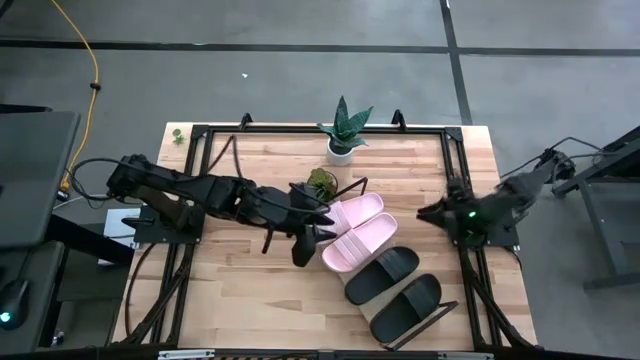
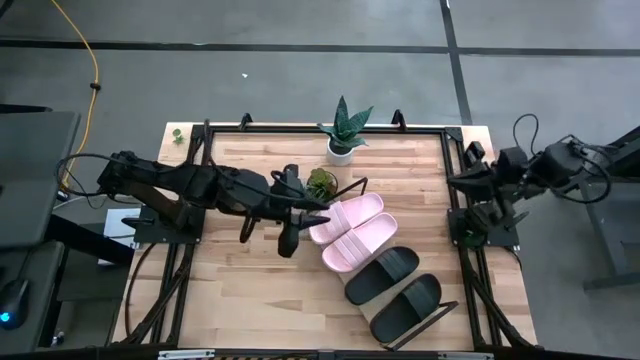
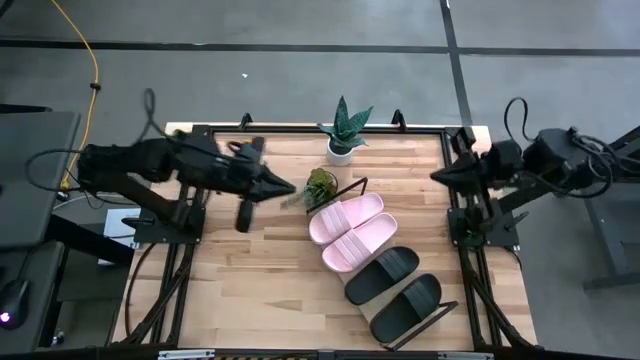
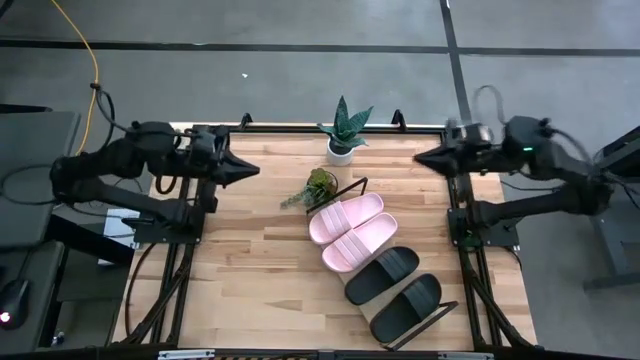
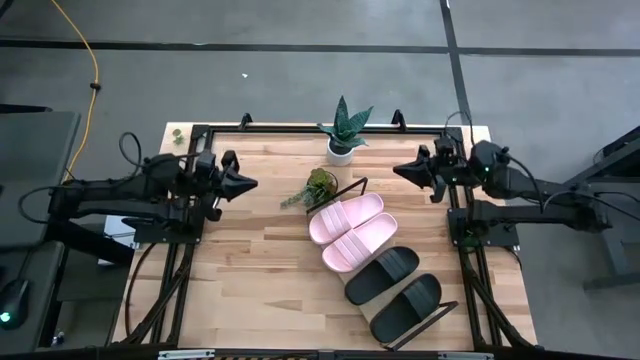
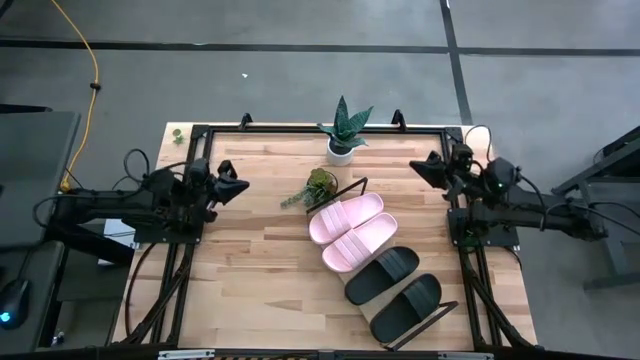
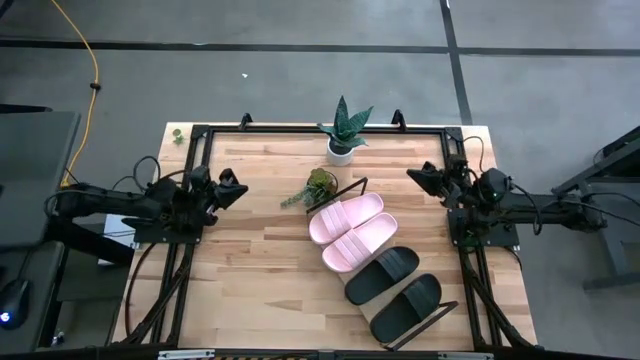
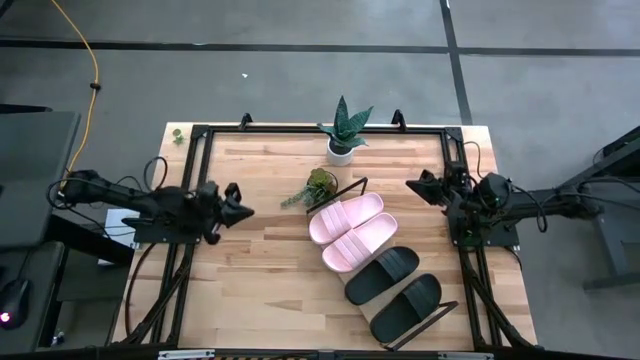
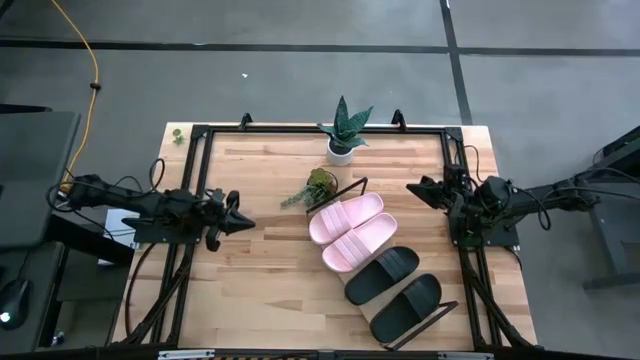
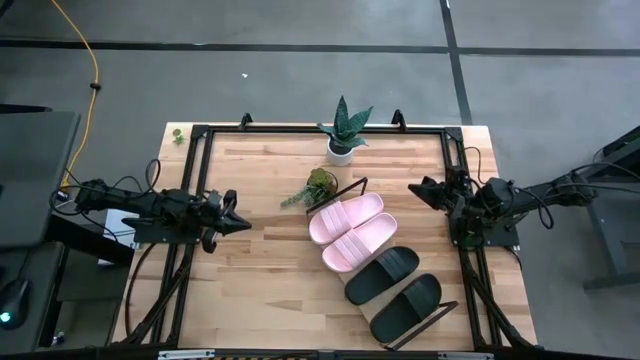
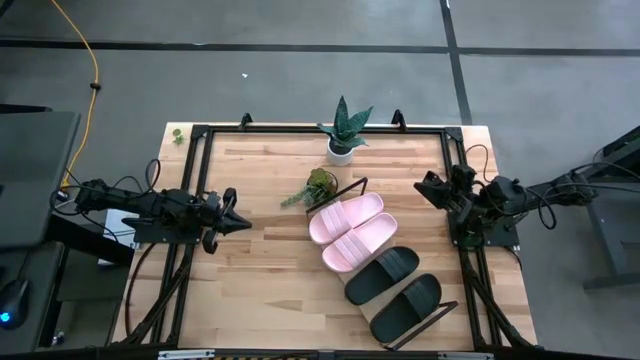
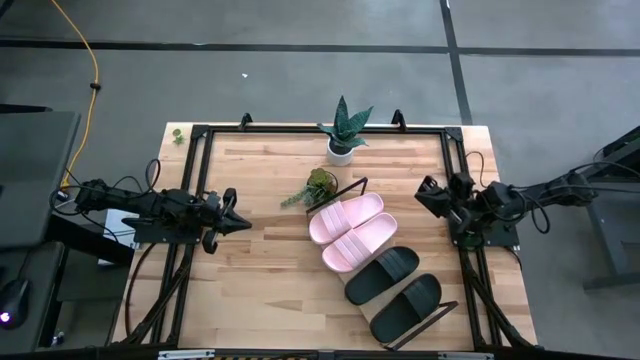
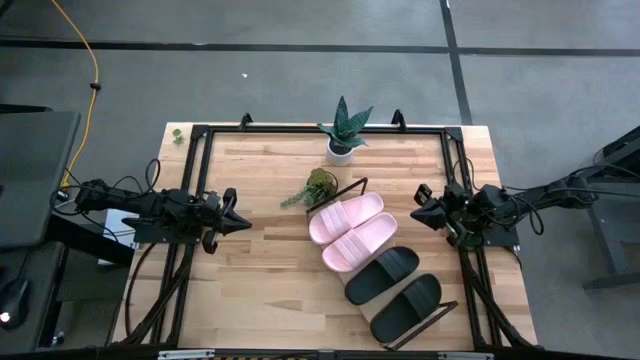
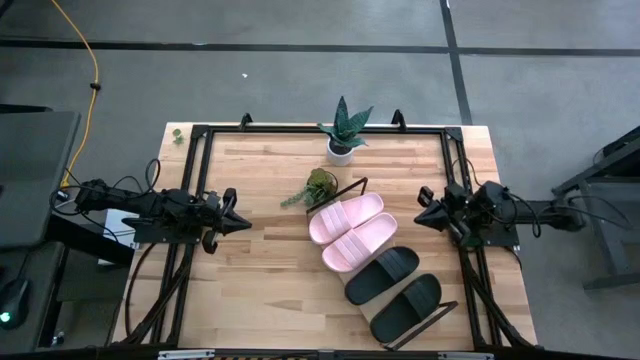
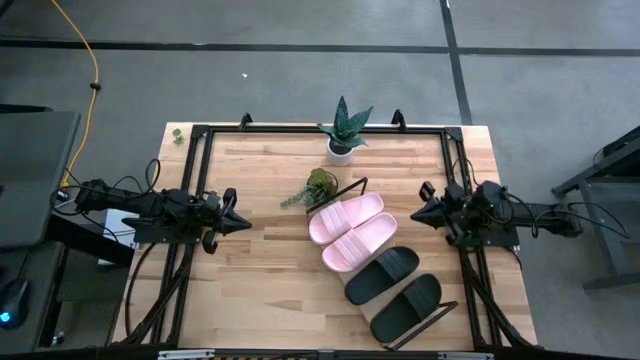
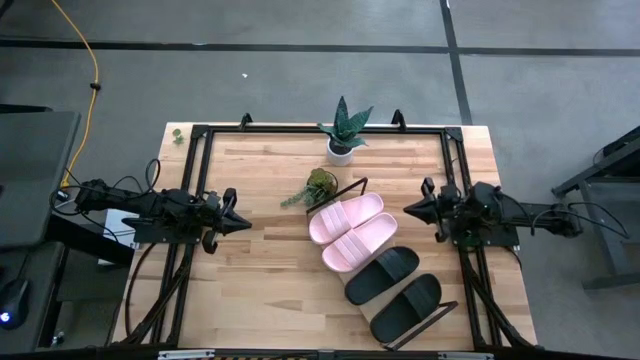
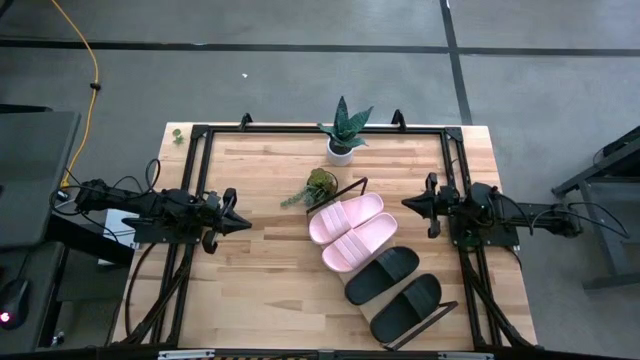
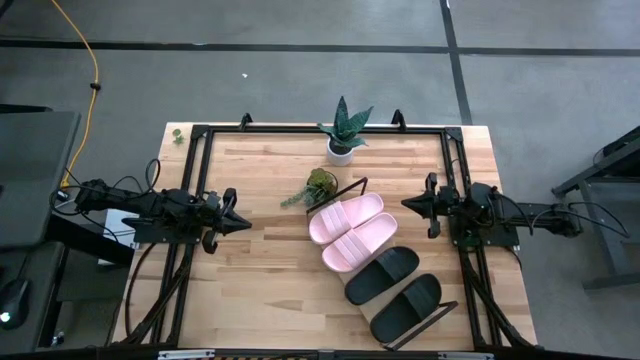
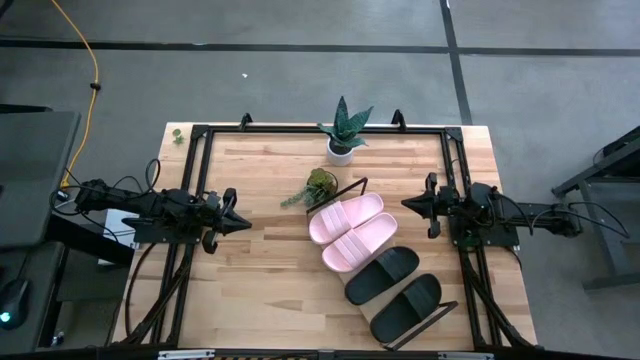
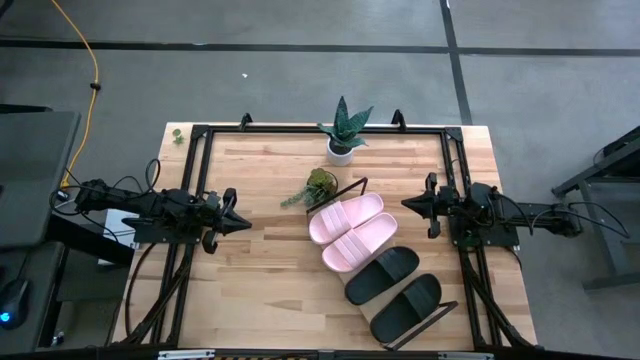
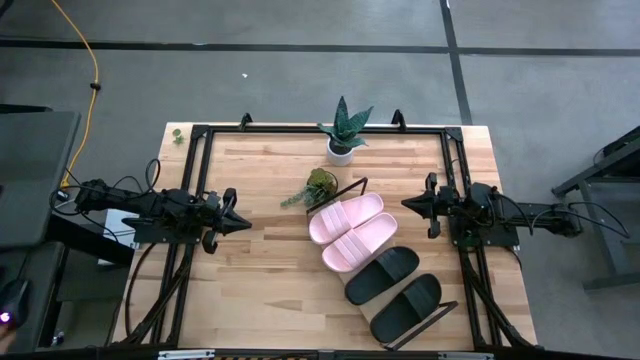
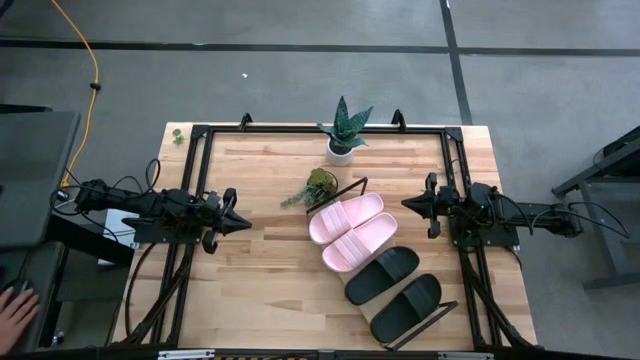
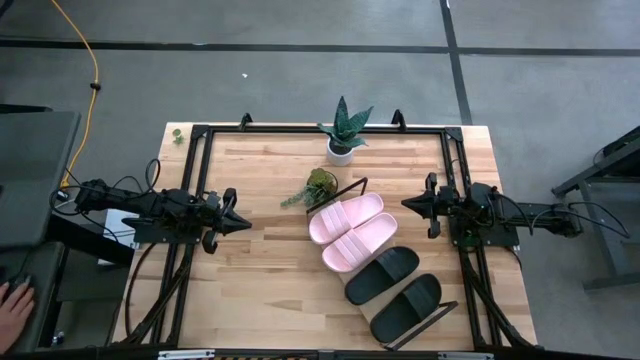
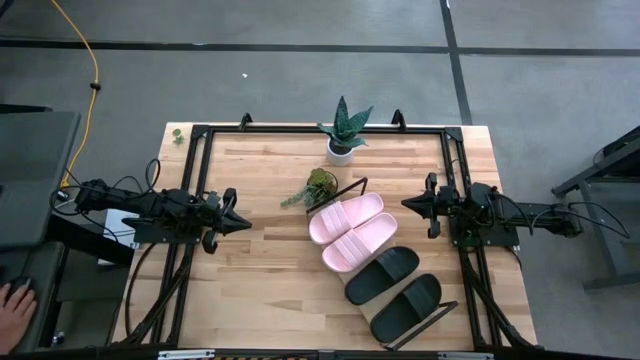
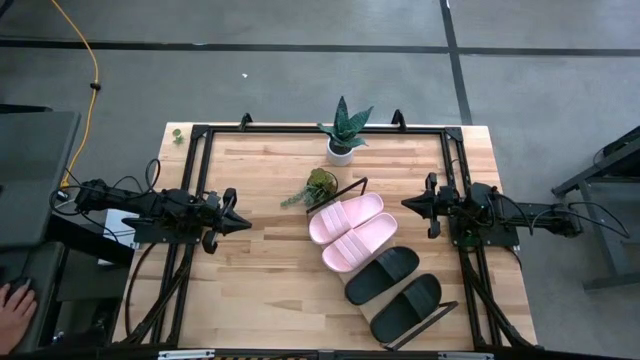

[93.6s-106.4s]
Task: Pick and place slides into the shelf
Return to Home Position

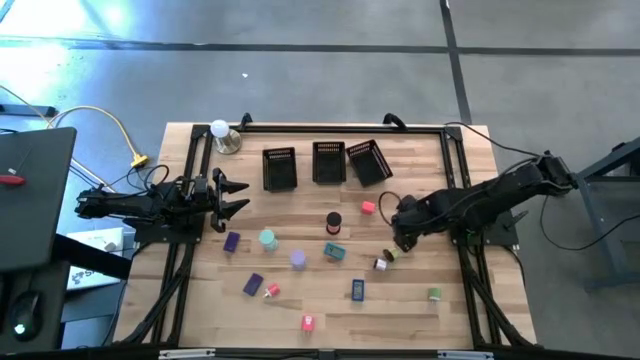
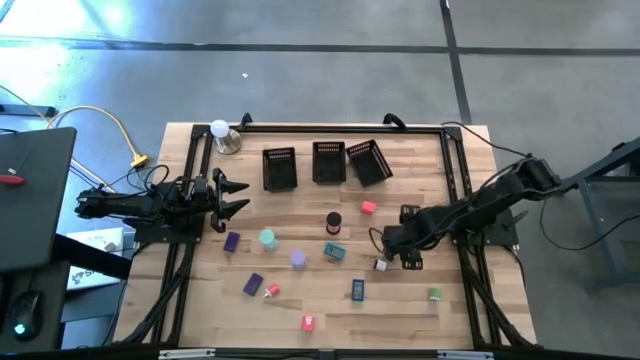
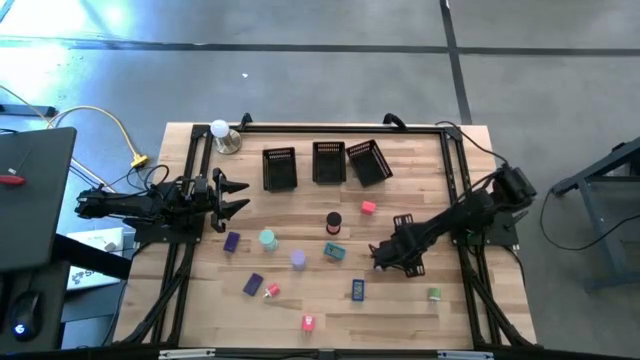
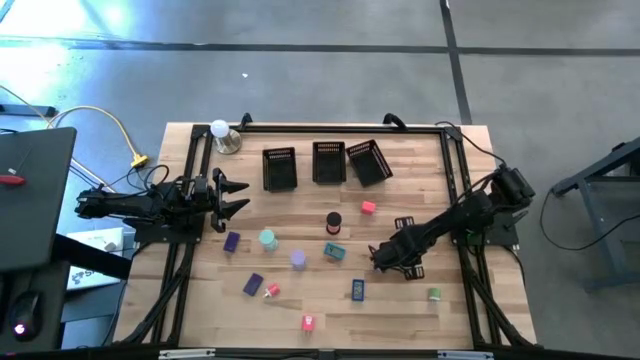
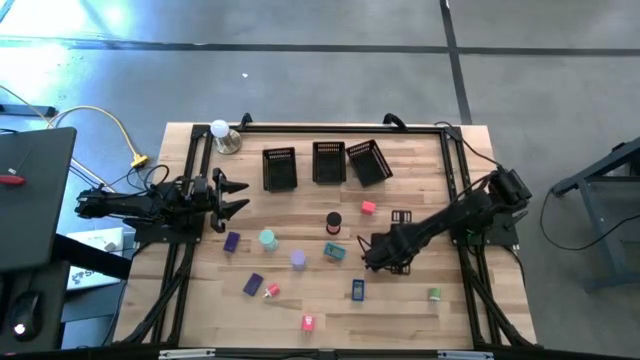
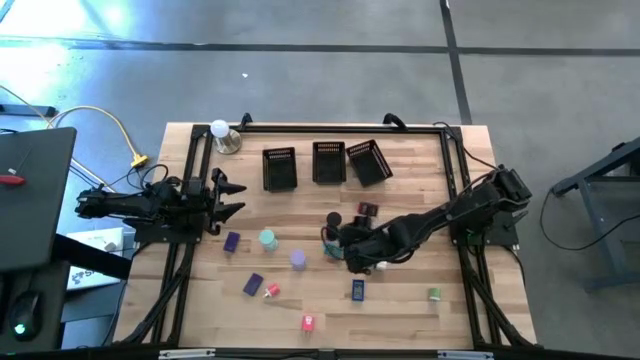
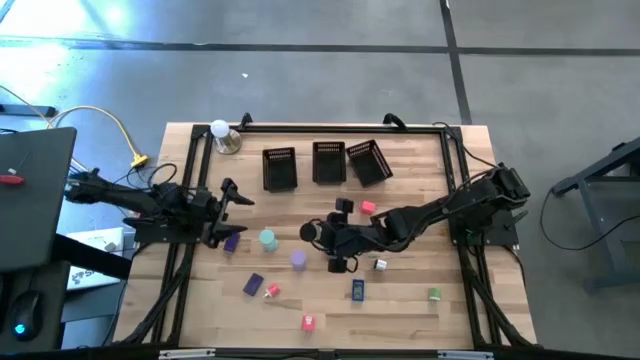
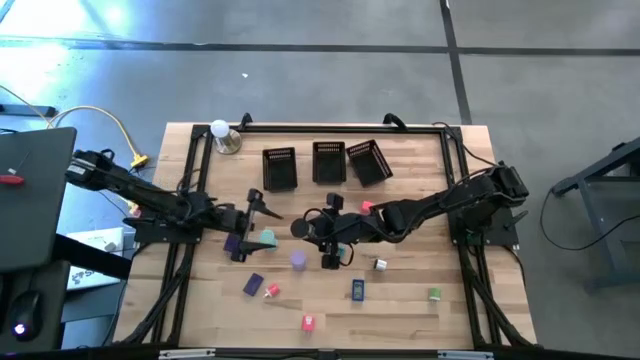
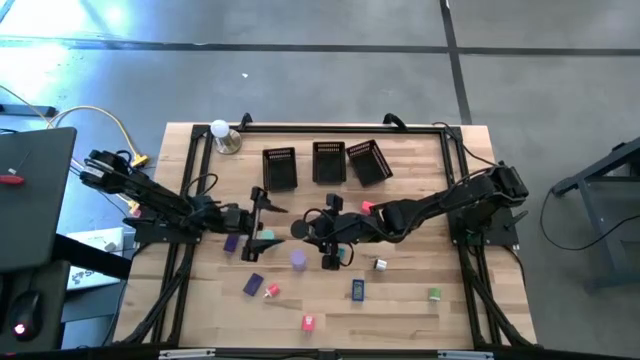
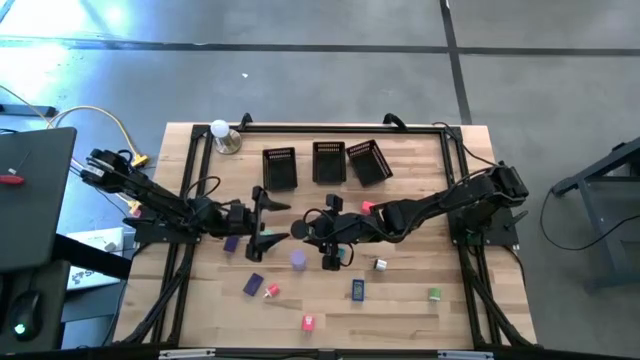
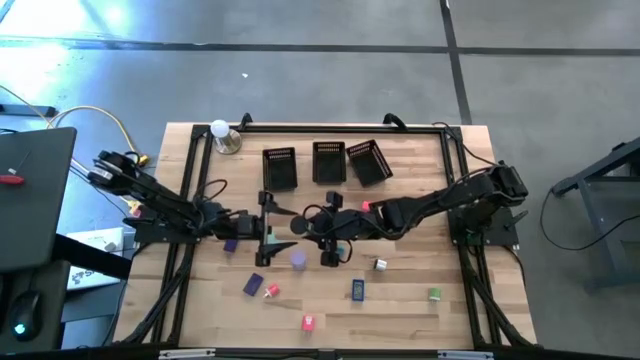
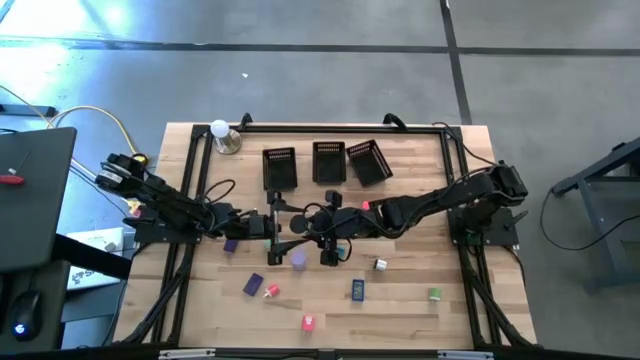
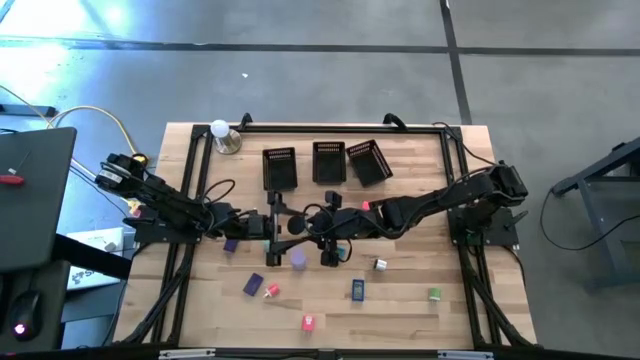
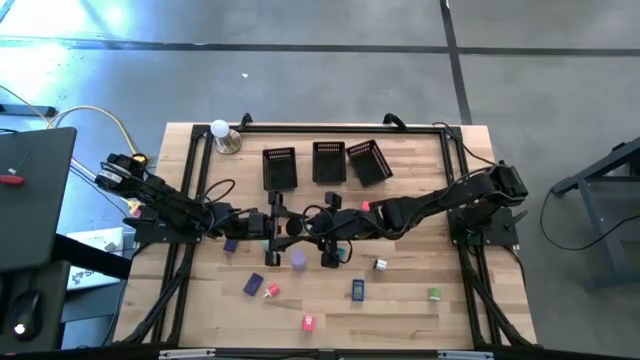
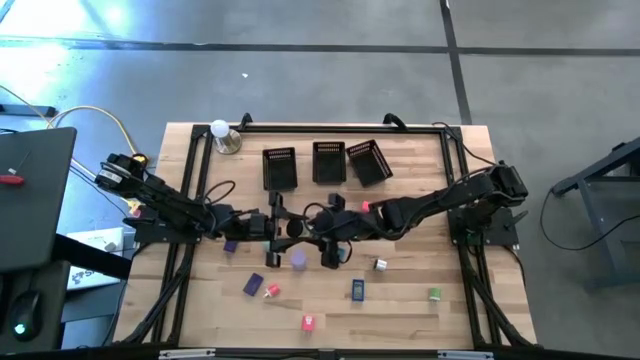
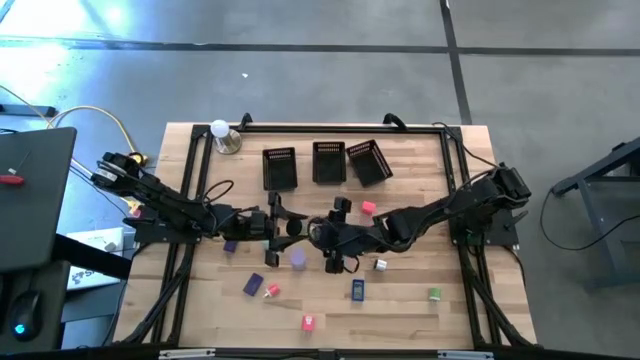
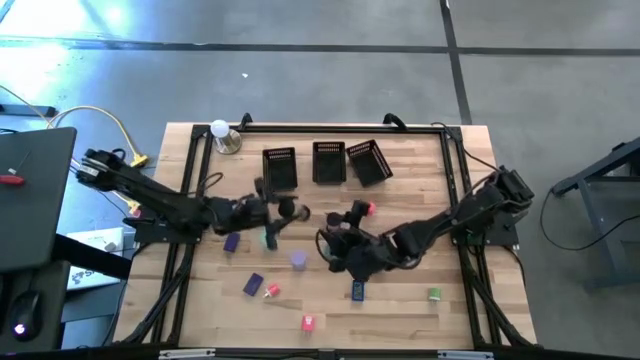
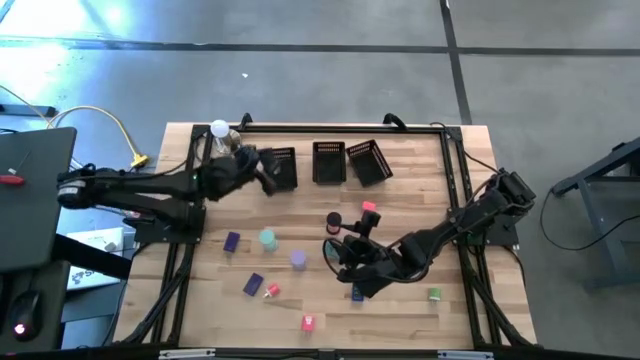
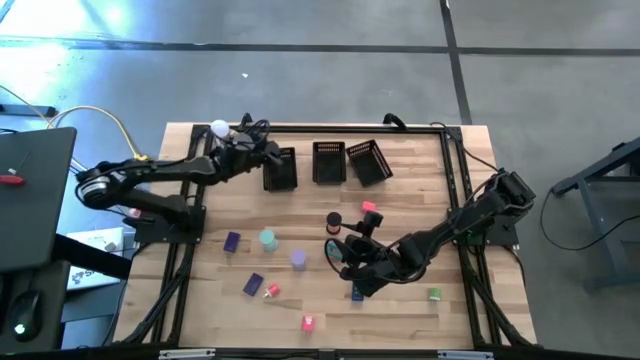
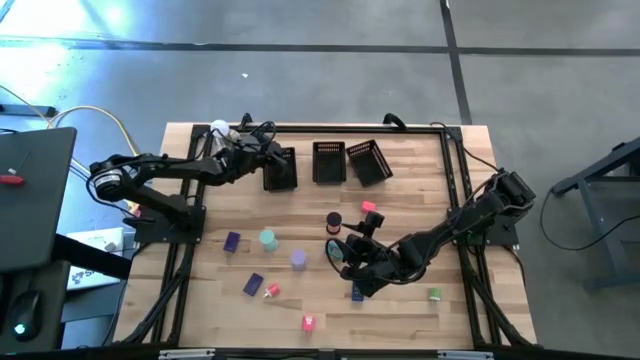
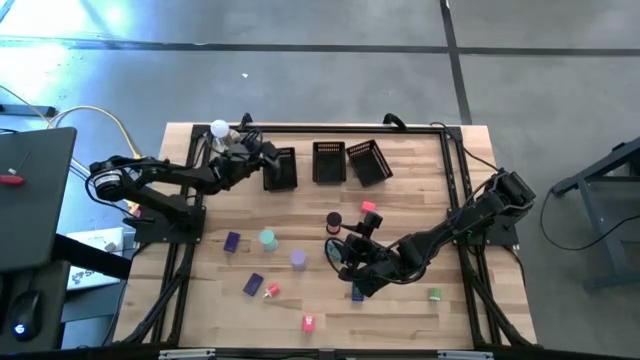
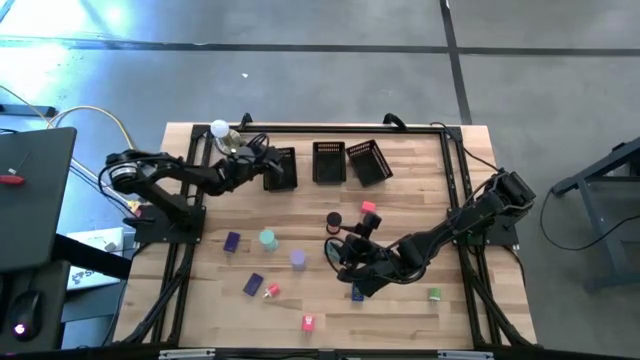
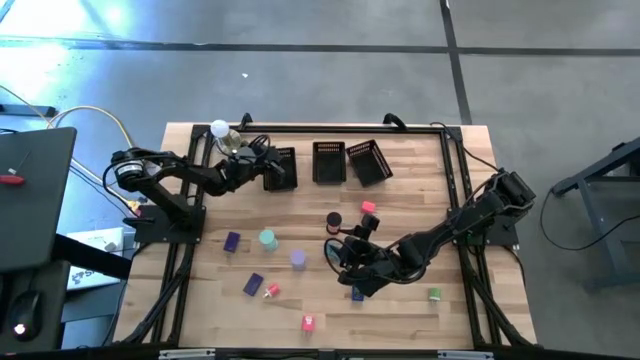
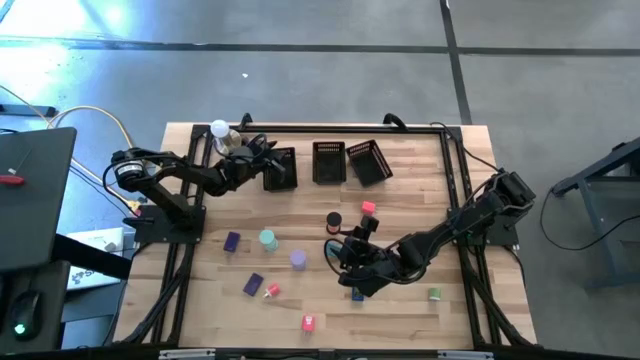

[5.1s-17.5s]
Task: Pick & Place Office items
Put the light green hourglass into the left black bin
